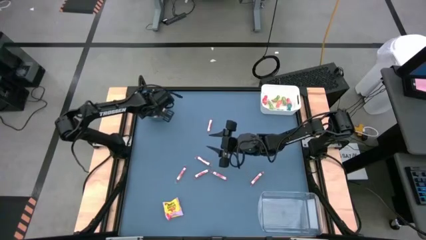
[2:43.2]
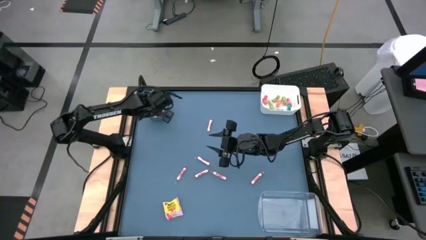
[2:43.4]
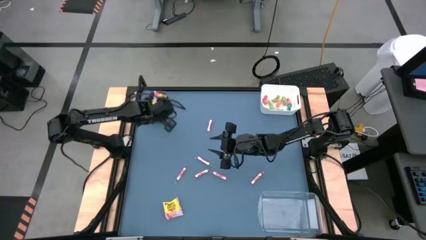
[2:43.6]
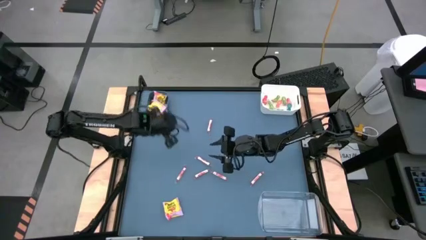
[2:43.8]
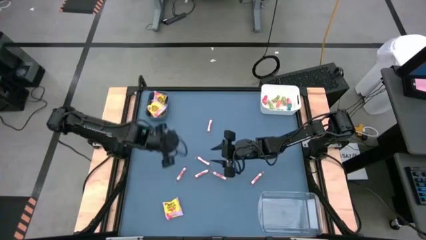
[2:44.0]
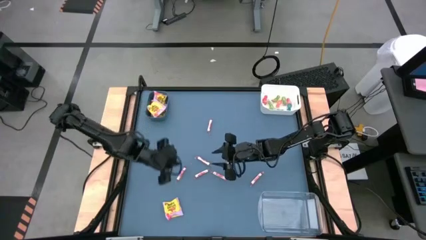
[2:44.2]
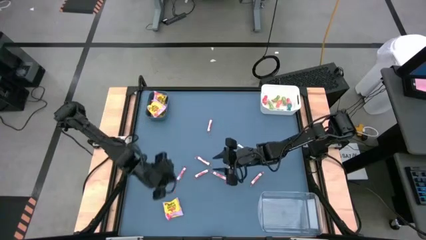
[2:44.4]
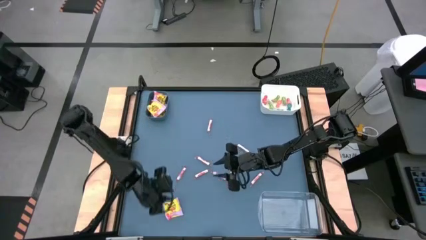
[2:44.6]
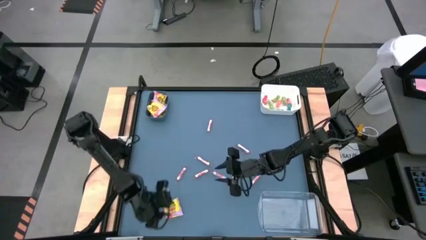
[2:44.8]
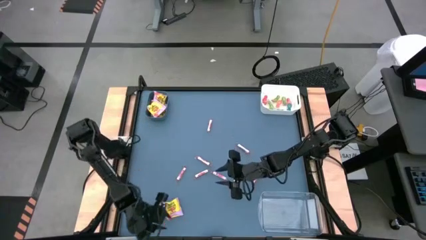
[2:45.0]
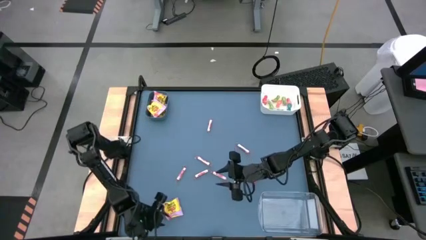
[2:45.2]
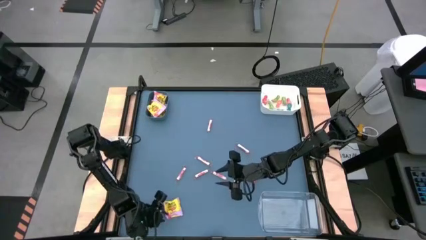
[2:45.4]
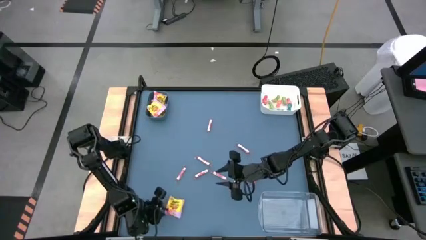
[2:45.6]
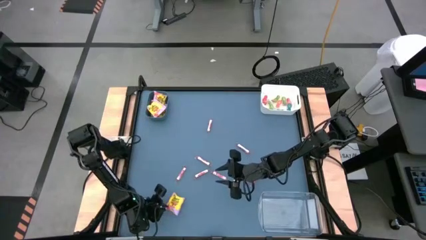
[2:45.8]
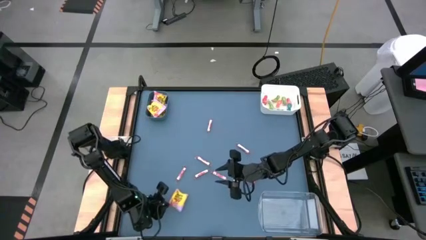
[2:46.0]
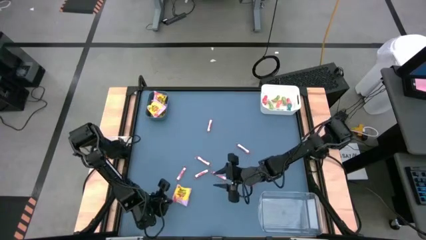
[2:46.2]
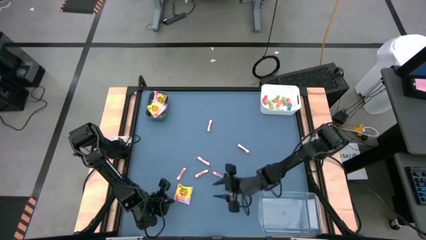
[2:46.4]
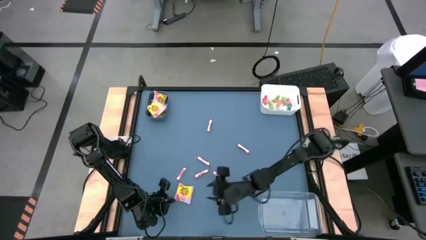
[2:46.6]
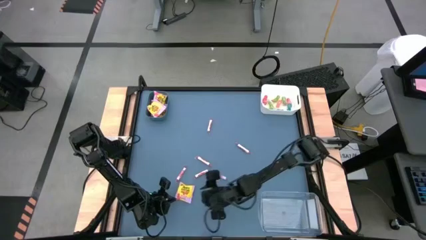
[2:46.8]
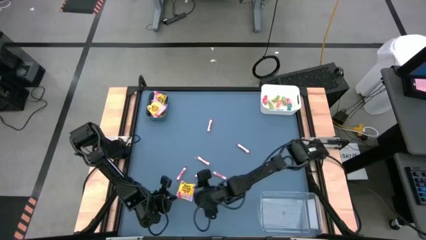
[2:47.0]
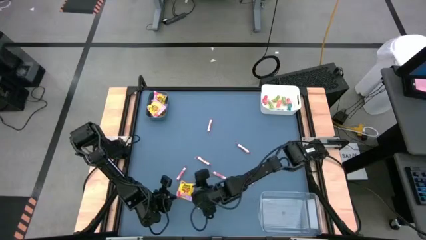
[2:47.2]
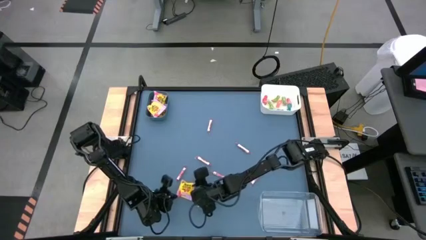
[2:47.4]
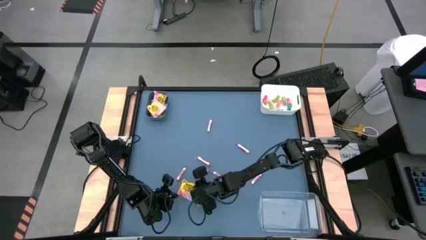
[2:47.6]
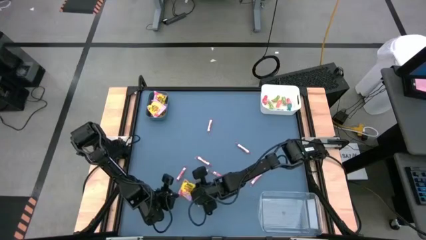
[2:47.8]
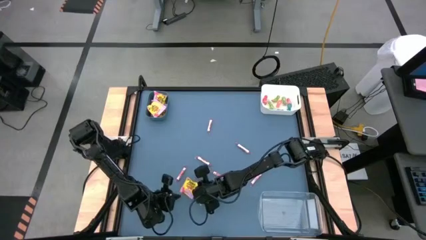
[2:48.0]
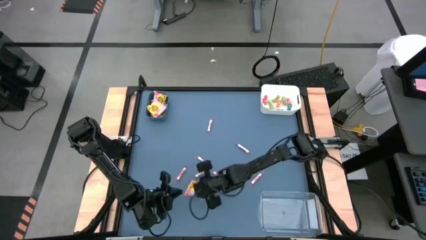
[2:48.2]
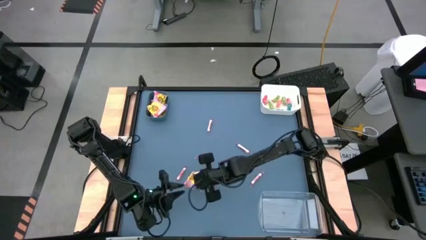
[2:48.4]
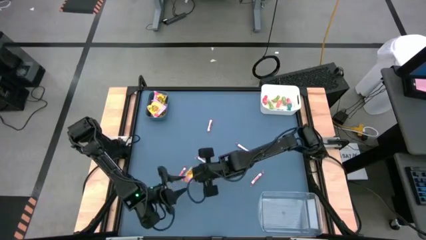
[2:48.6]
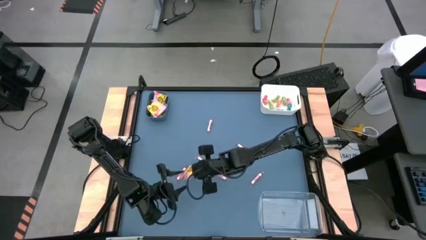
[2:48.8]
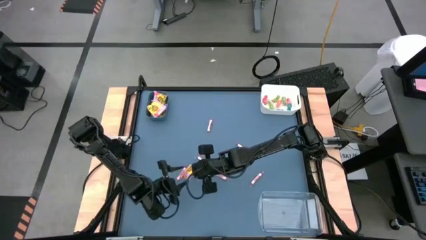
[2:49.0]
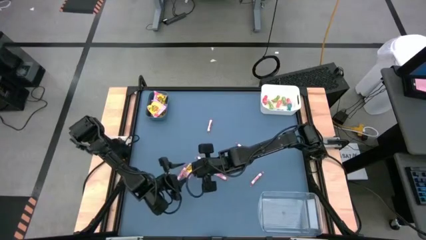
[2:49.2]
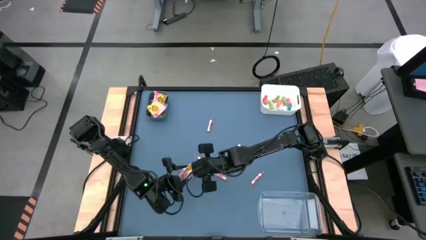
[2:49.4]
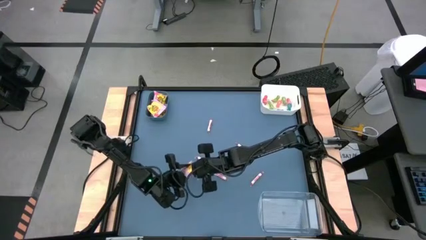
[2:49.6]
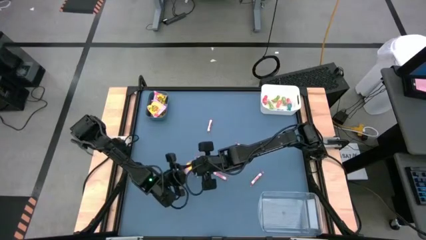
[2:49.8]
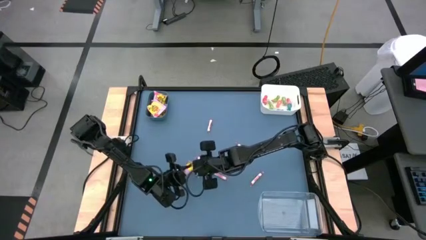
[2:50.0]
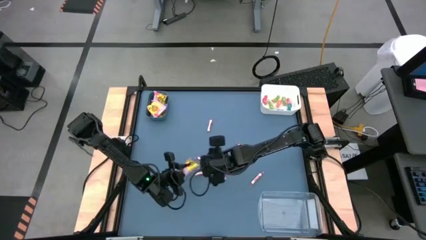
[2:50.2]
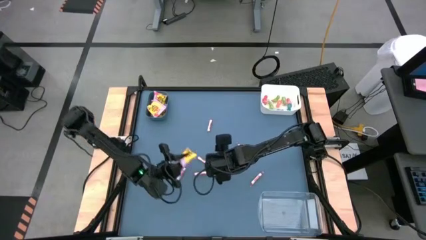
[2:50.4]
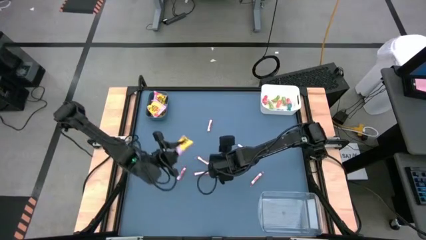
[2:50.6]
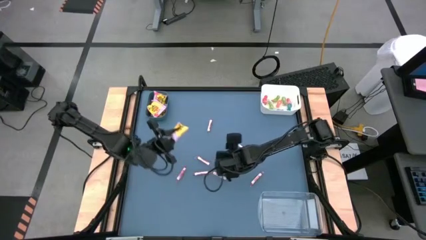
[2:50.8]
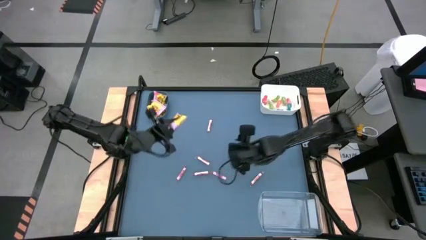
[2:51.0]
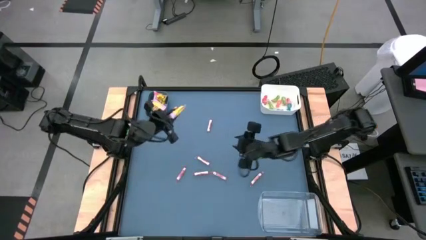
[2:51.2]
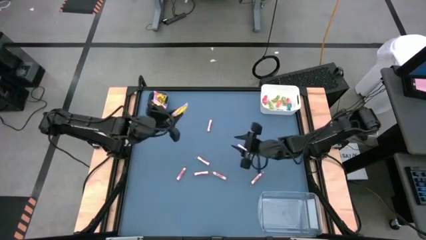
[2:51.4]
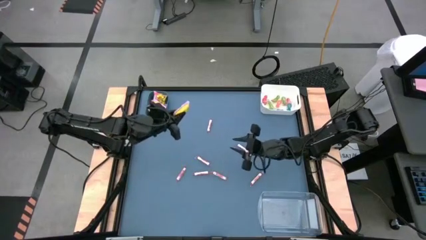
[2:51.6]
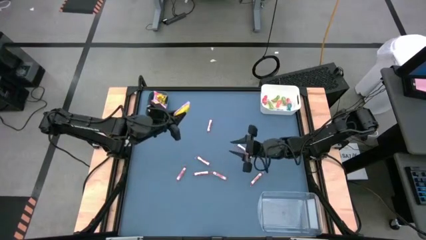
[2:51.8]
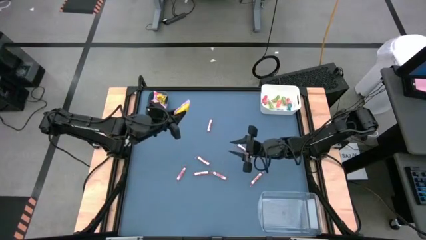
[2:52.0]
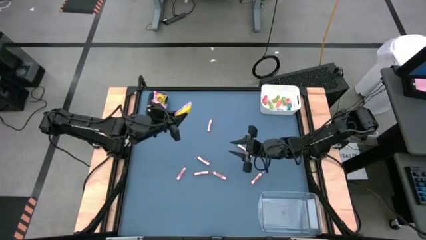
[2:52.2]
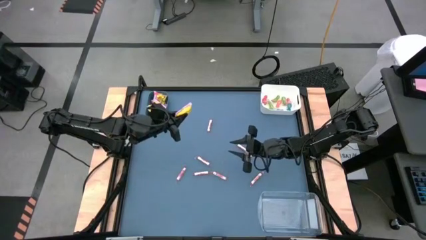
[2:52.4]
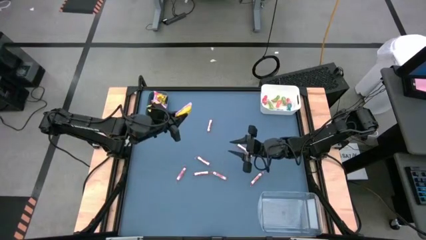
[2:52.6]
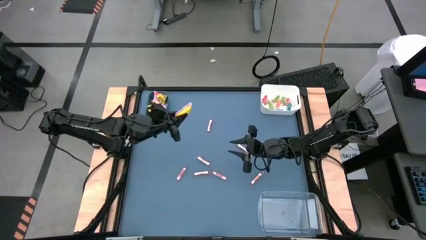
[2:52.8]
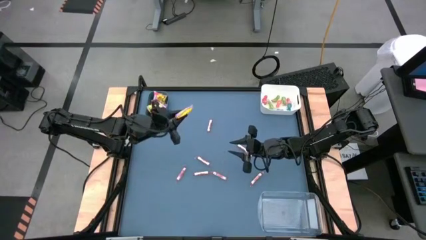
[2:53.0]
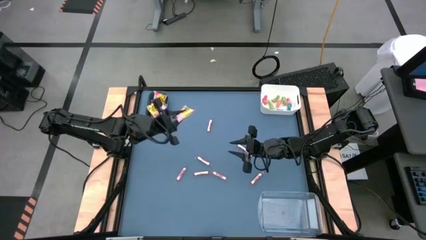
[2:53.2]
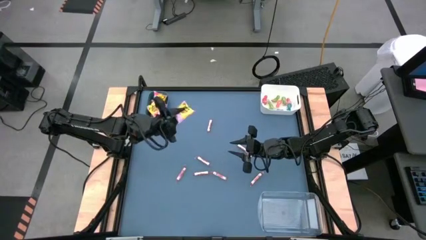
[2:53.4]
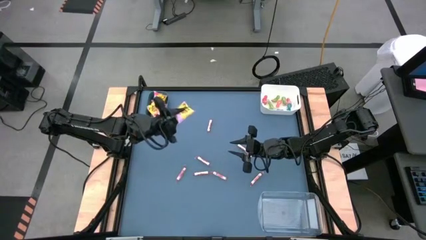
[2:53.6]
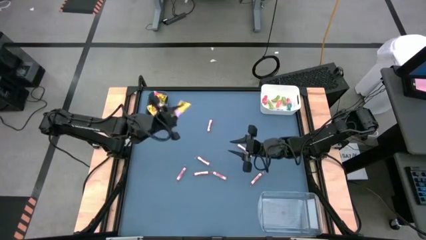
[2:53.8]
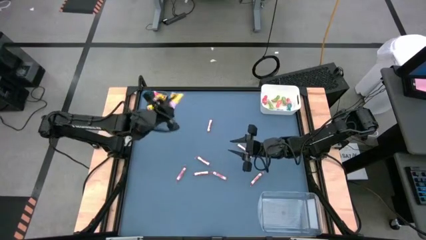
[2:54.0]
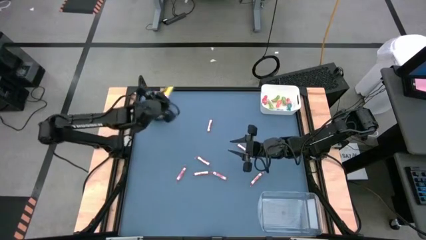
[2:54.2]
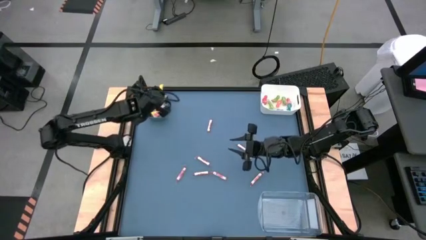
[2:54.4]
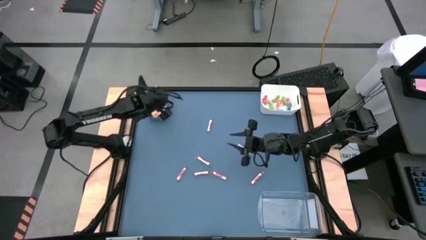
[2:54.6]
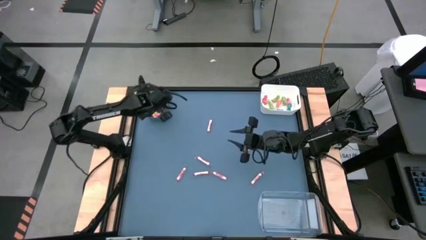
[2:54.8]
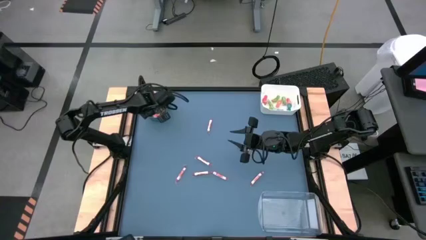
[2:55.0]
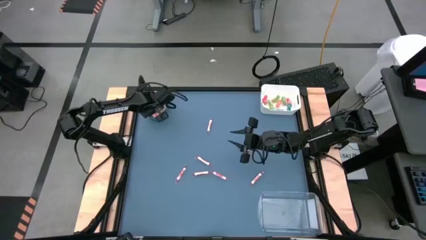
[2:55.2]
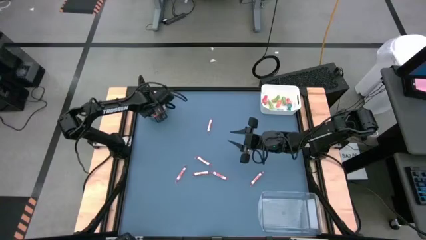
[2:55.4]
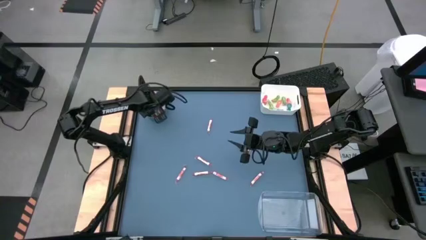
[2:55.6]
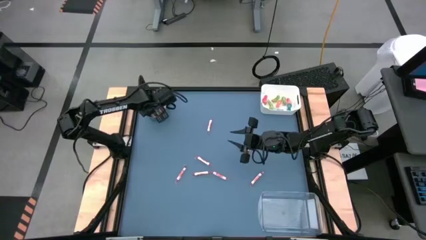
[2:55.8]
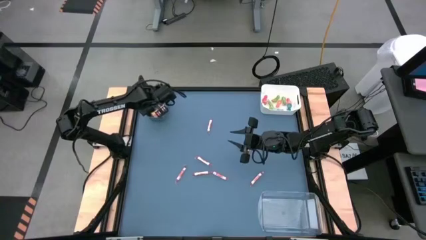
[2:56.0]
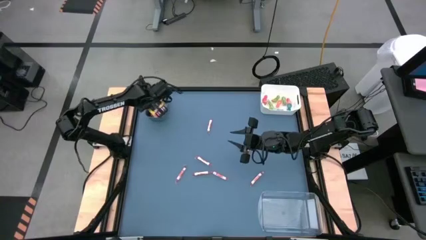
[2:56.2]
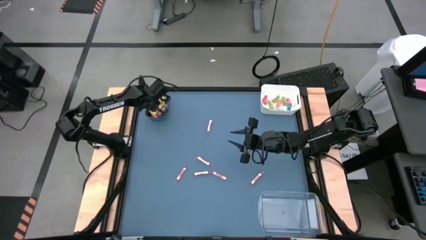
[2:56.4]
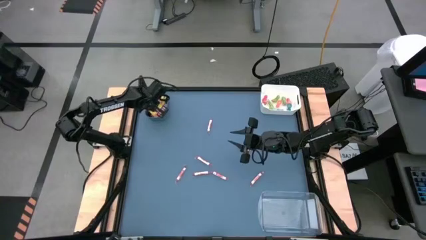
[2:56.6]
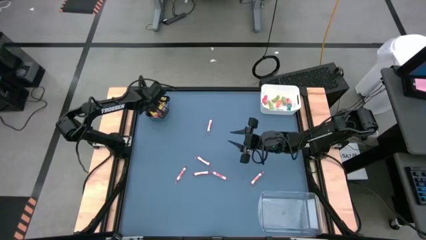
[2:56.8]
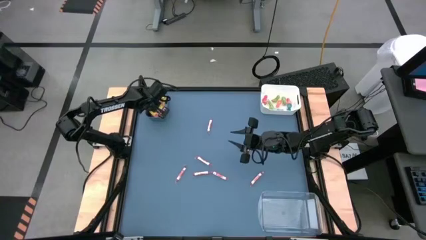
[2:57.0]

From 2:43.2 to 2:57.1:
Task: Sort candy
Put the yellow candy pack into the blue bin
